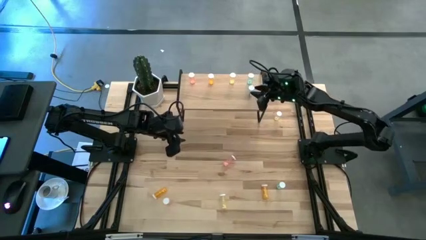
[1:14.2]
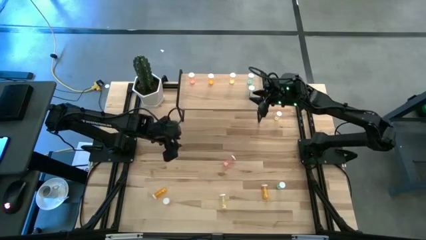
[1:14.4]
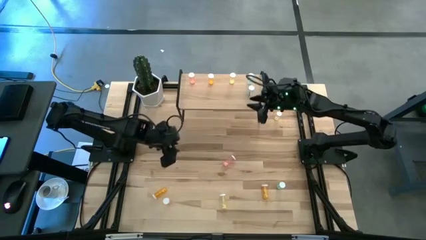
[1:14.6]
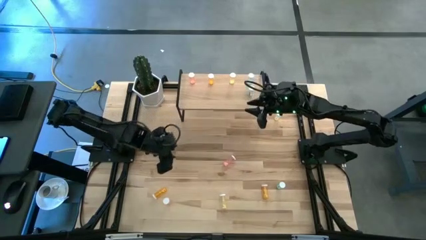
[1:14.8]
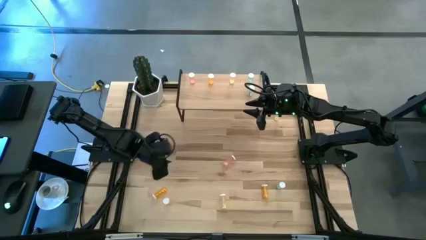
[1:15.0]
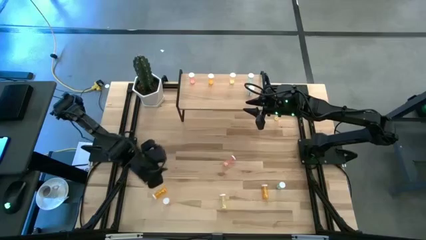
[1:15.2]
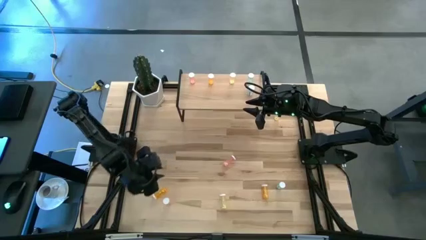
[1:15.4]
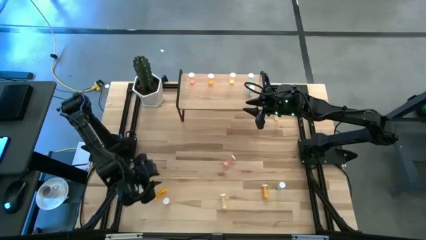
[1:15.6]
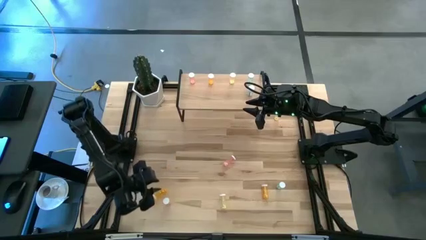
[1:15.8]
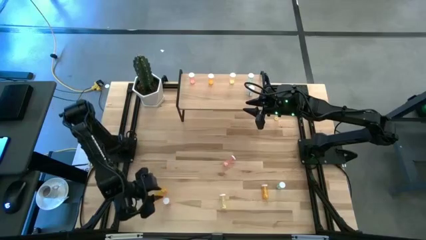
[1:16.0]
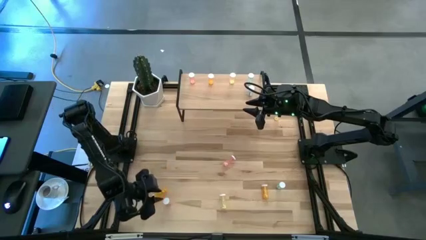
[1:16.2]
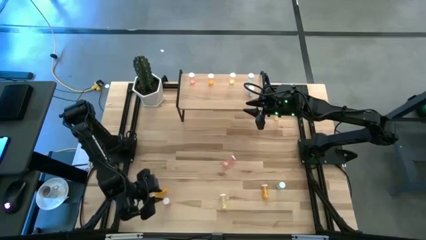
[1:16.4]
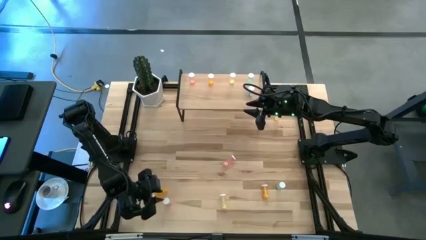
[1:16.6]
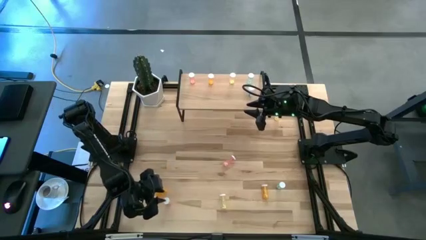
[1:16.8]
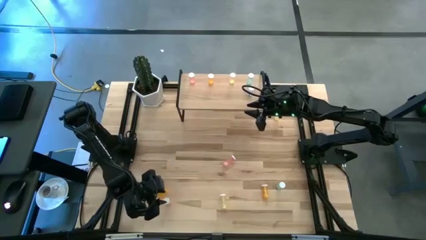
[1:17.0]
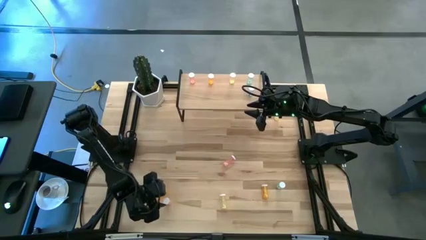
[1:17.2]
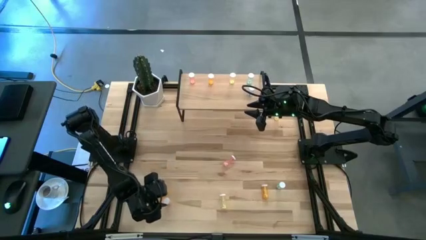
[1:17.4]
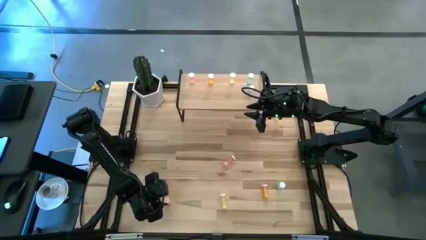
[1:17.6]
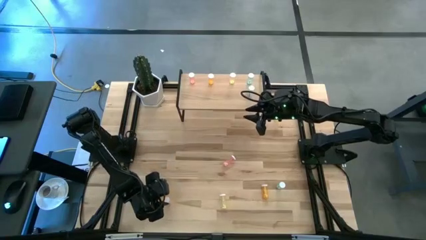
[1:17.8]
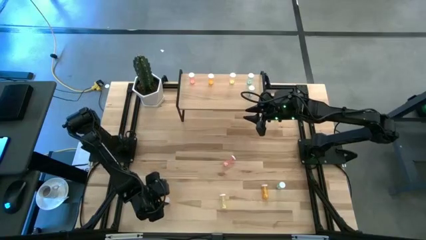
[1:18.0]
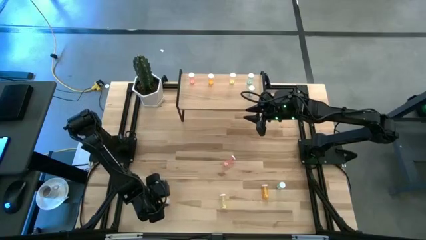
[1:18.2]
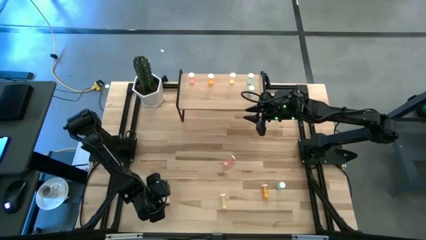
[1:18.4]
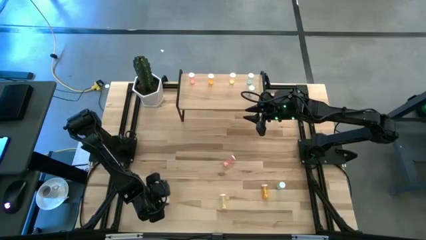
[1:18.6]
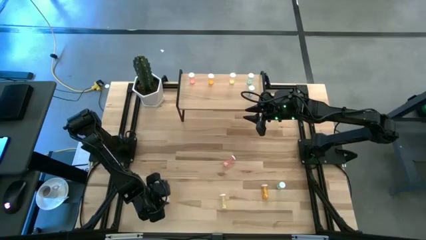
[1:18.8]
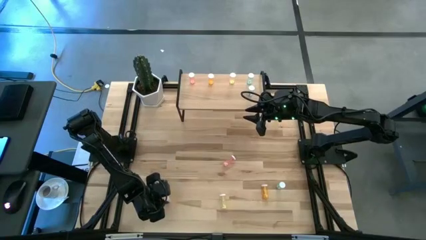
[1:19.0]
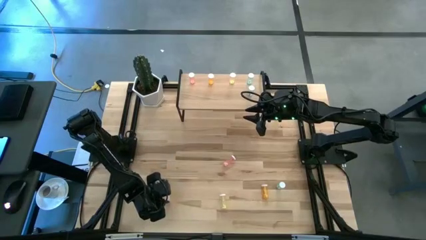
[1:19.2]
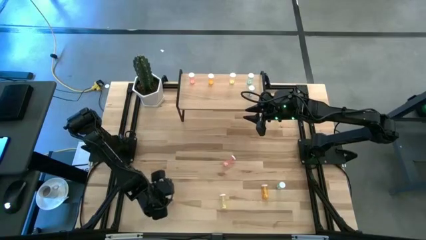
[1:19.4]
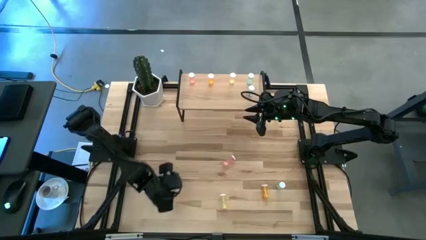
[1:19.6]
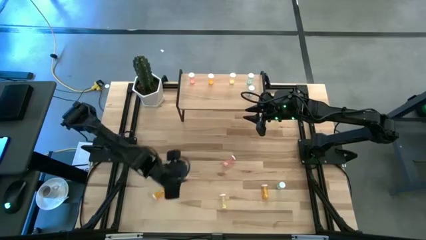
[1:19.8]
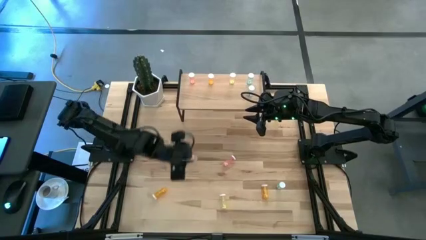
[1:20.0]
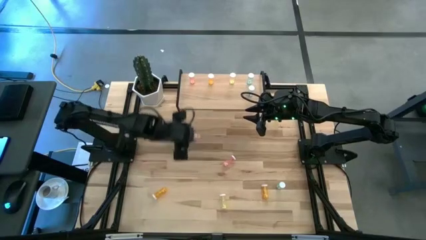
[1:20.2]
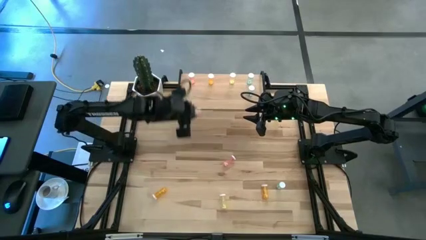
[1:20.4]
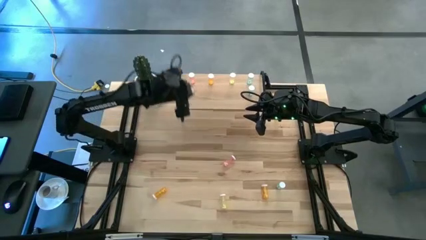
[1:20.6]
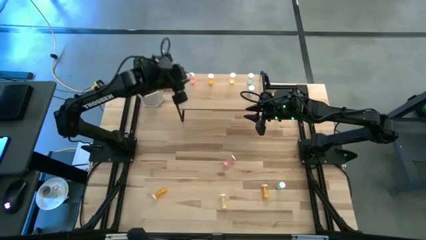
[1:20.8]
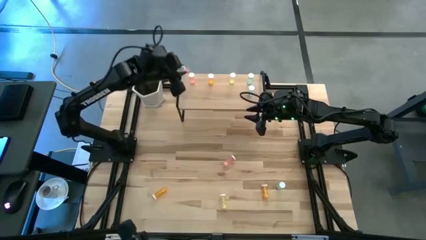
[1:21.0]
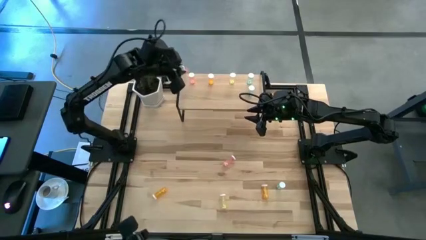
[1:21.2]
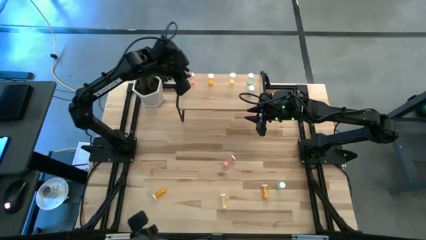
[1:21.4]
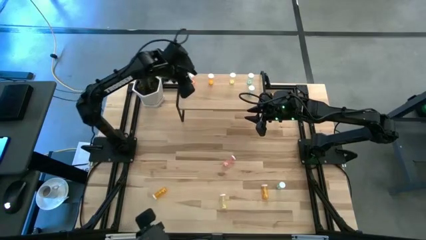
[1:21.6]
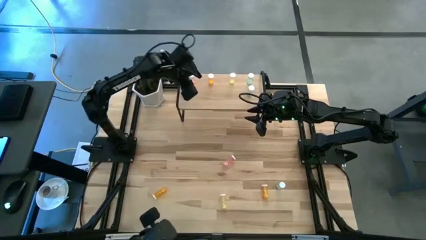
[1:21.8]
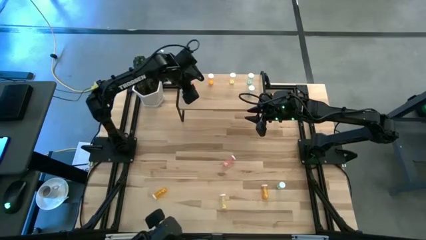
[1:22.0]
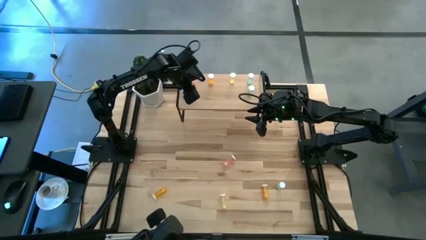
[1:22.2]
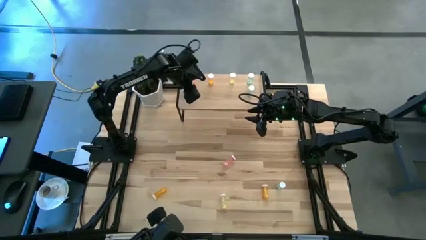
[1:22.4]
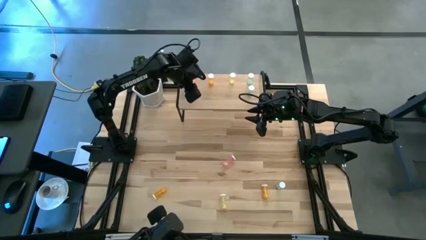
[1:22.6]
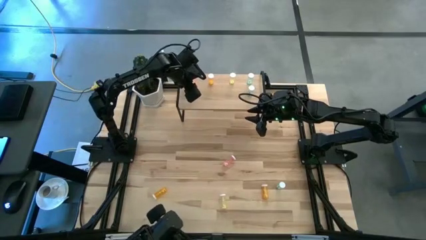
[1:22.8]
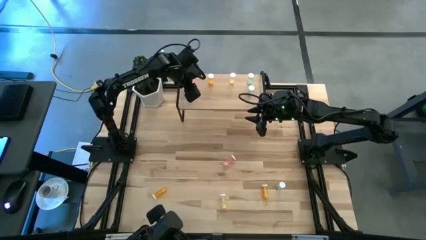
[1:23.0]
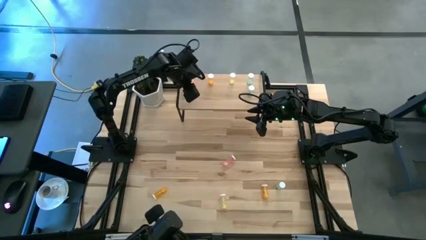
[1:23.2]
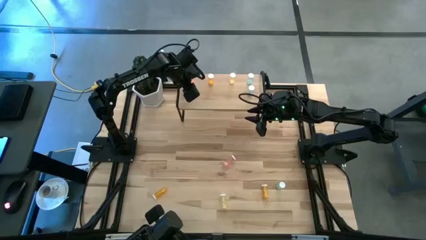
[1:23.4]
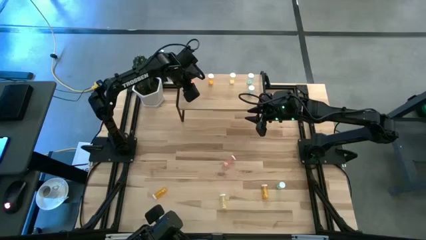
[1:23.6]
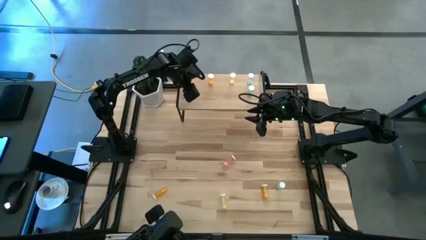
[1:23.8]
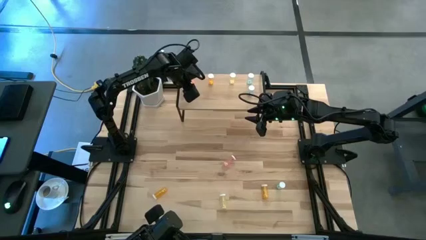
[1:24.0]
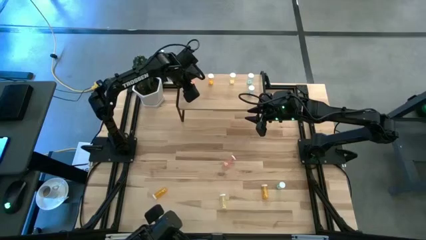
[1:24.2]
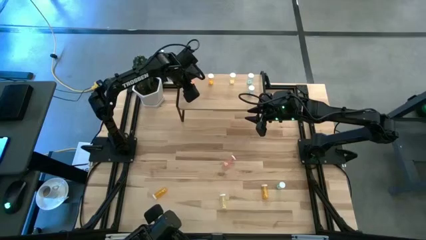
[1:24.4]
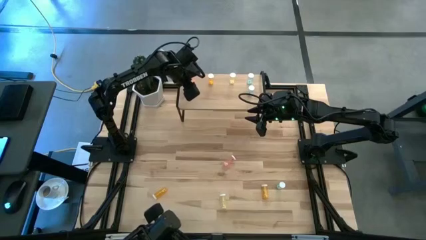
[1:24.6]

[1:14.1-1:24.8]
Task: Pick and place medicine bottles onto shelf by color
Put the left pink pill bottle aligned with the other pink pill bottle on the shelf

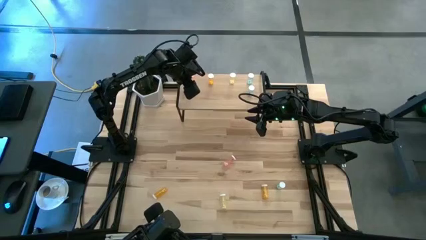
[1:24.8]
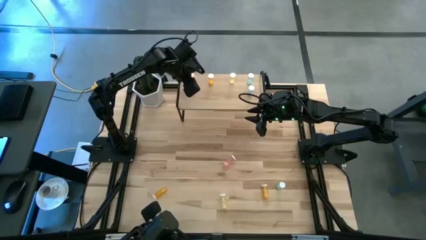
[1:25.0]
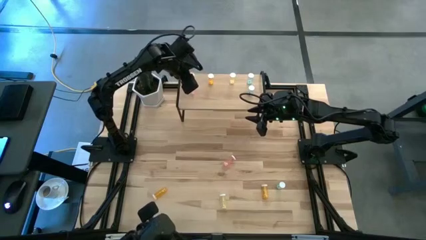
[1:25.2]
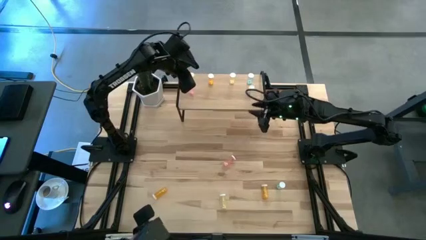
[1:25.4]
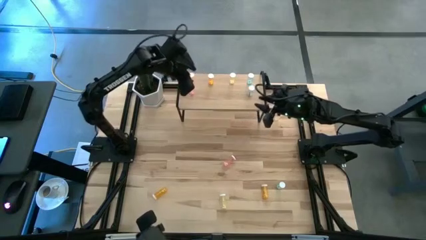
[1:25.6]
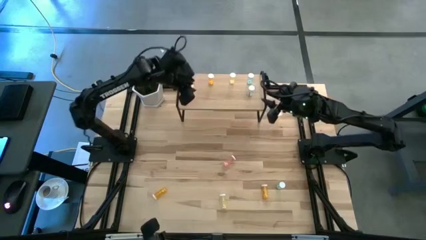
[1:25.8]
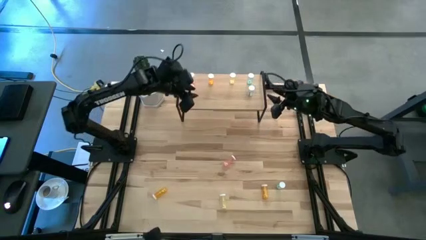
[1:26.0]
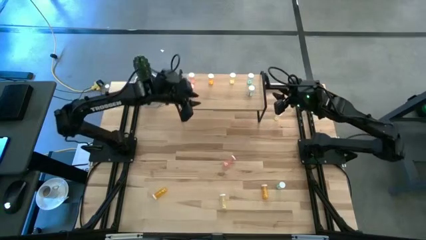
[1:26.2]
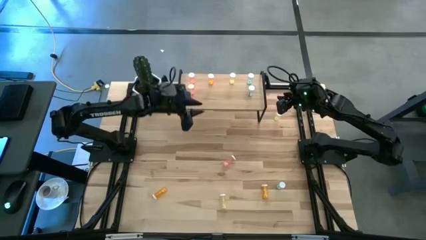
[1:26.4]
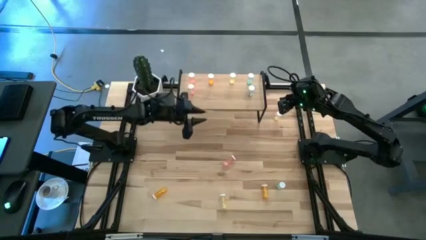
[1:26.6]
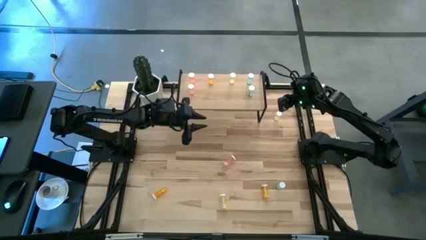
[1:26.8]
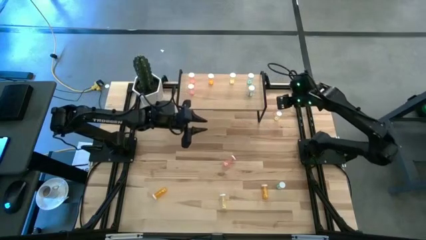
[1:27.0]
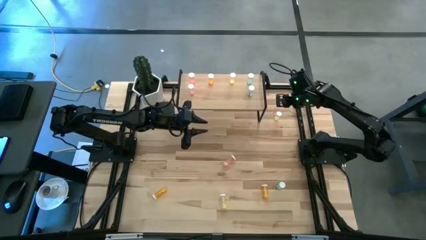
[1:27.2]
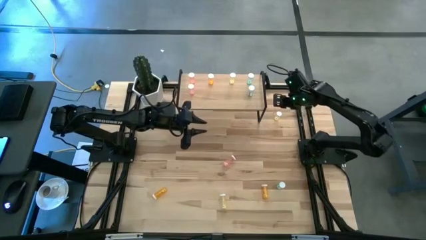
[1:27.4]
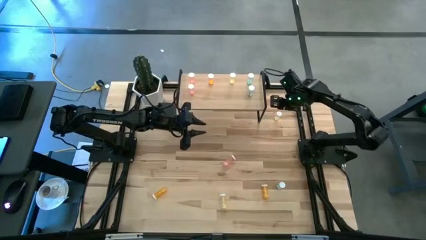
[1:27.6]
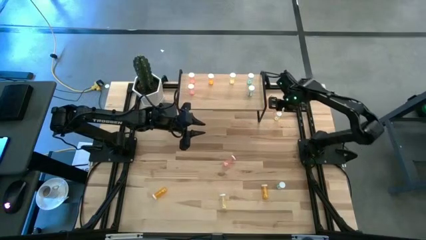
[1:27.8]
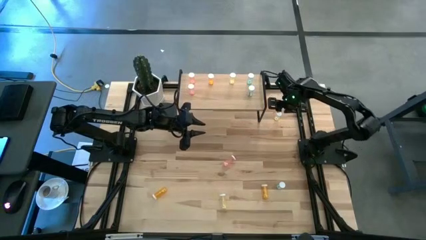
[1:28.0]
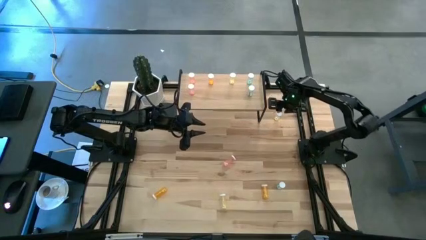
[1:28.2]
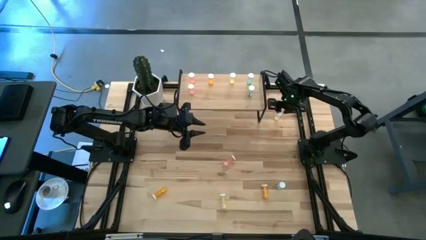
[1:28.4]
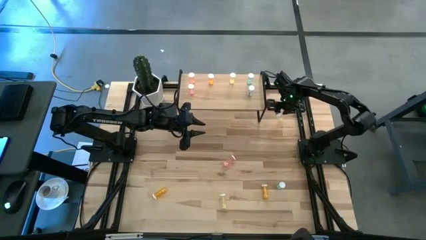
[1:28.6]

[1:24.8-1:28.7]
Put the top yellow pill bottle aligned with the other yellow pill bottle on the shelf

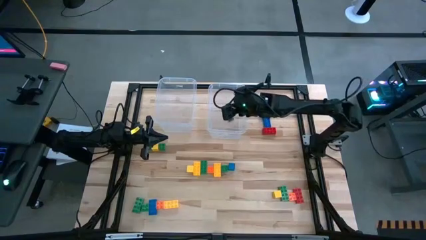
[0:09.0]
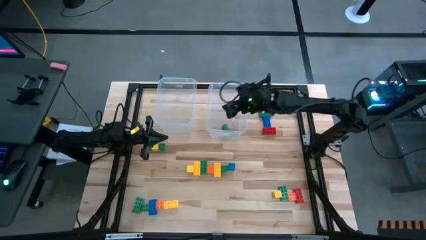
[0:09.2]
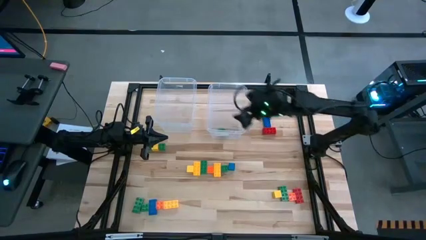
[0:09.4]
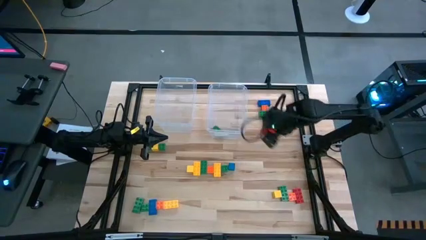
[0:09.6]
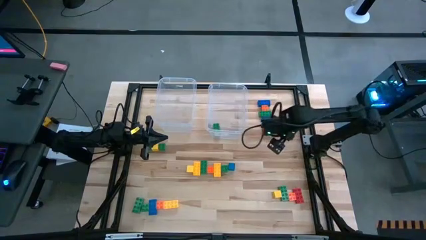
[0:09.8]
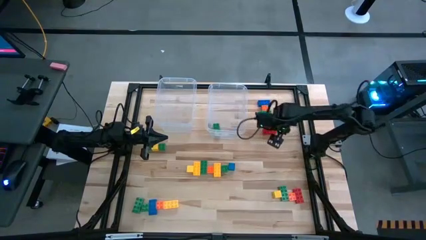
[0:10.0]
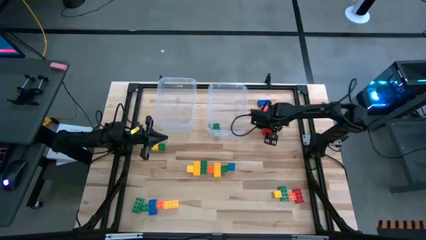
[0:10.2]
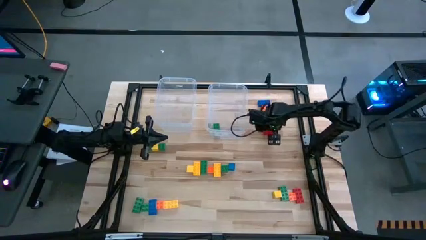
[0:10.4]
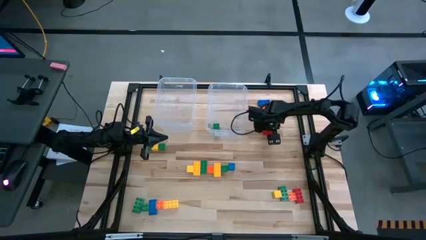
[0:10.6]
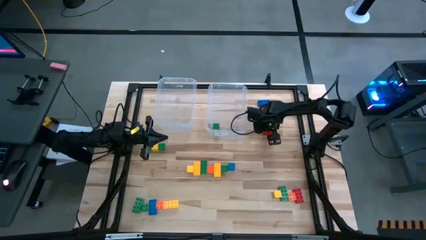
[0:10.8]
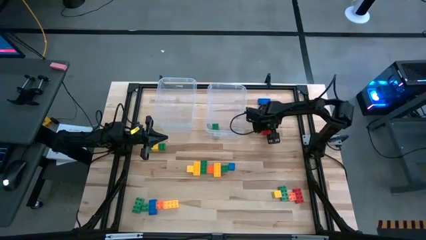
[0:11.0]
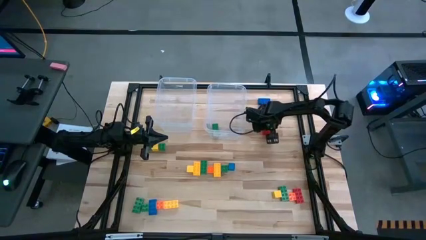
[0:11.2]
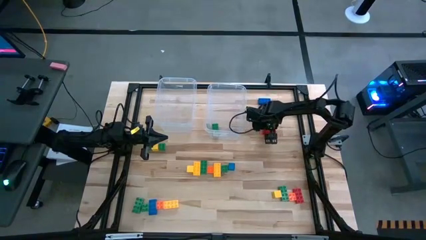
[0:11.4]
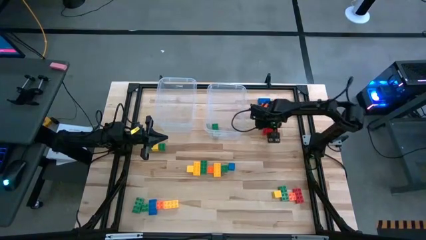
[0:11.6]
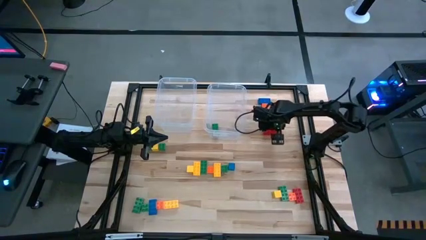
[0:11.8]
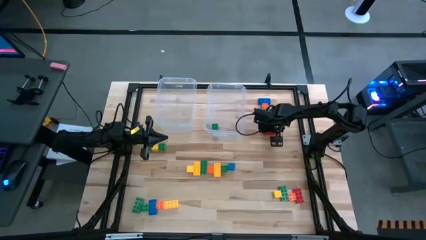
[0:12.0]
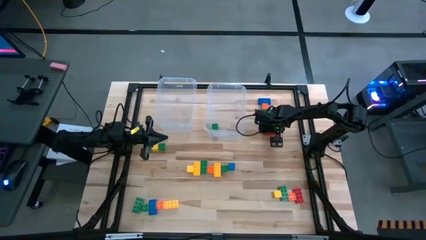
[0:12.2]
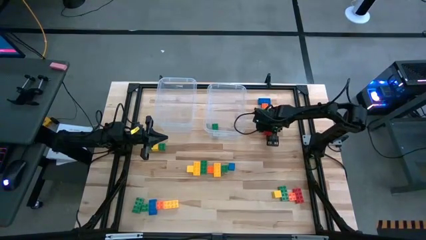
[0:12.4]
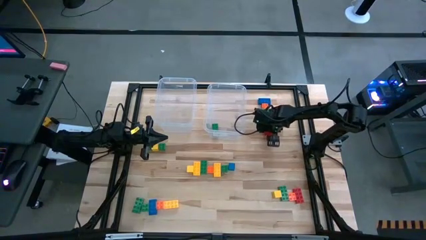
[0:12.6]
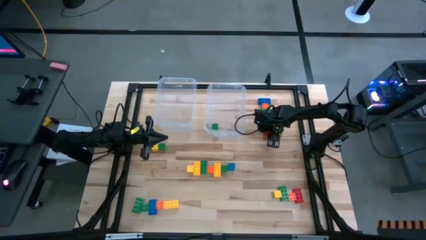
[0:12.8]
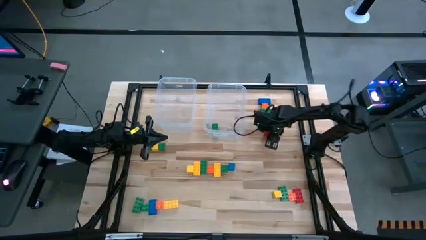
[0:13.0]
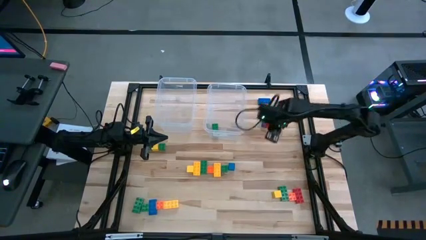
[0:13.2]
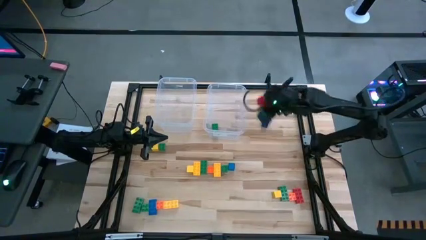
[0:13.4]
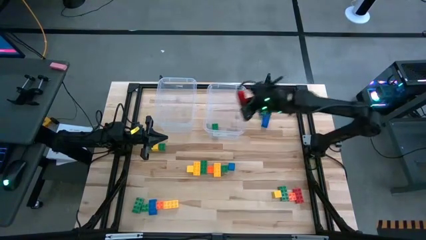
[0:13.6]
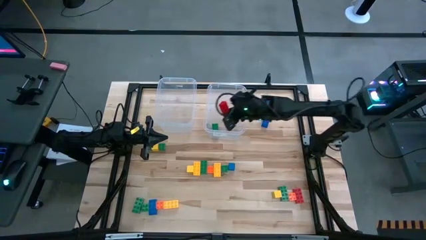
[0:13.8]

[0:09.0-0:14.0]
Task: Sort blocks by size
Put the red big game piece into the right transparent bin
